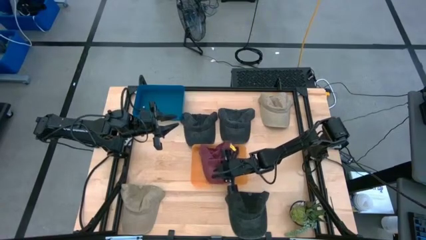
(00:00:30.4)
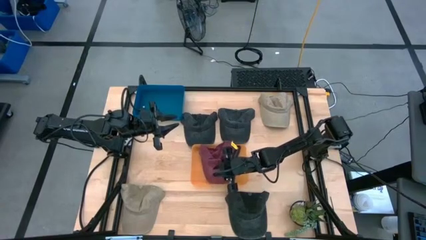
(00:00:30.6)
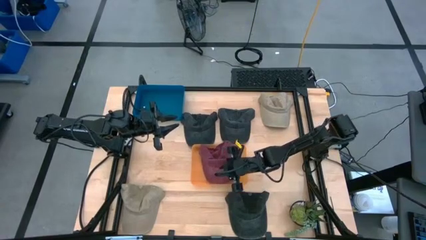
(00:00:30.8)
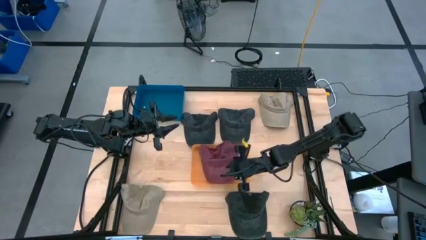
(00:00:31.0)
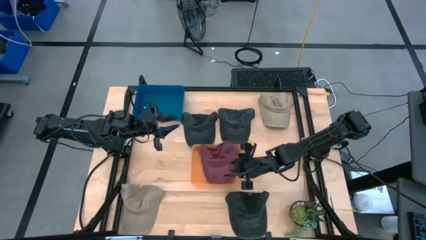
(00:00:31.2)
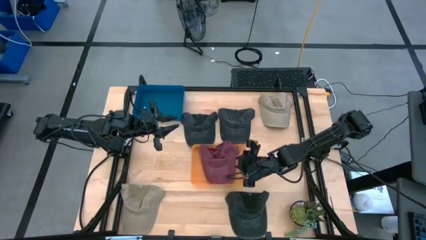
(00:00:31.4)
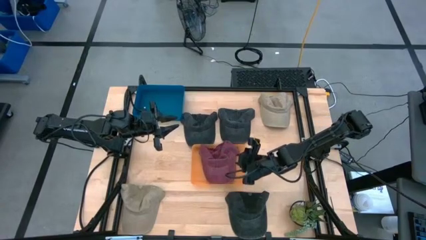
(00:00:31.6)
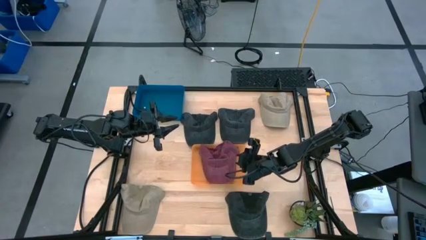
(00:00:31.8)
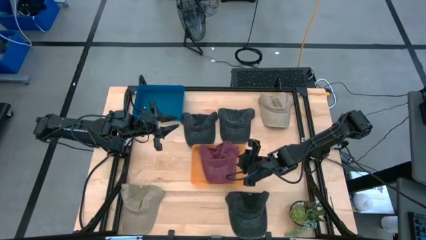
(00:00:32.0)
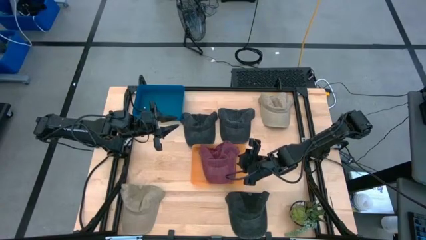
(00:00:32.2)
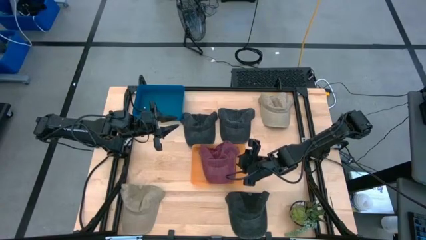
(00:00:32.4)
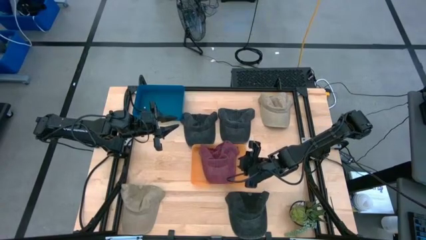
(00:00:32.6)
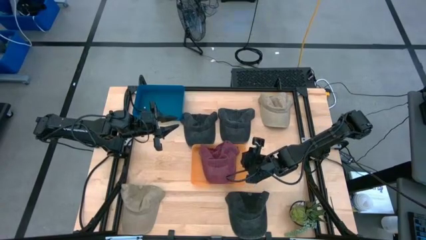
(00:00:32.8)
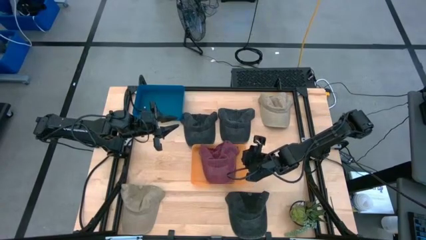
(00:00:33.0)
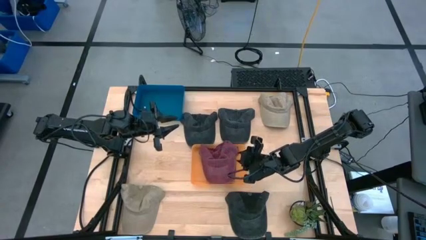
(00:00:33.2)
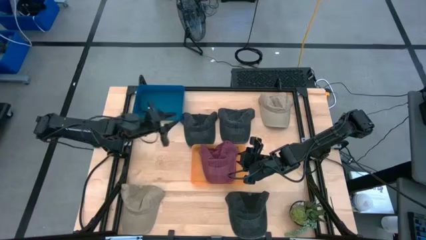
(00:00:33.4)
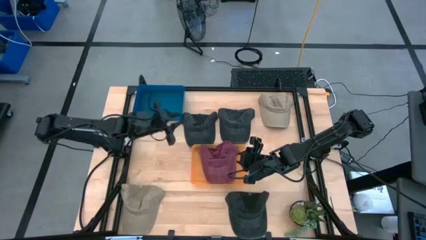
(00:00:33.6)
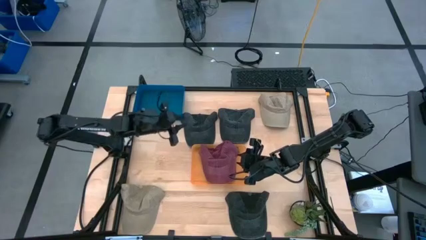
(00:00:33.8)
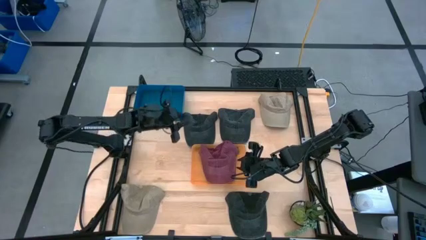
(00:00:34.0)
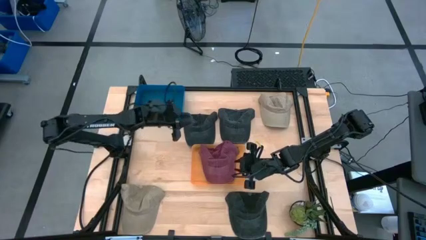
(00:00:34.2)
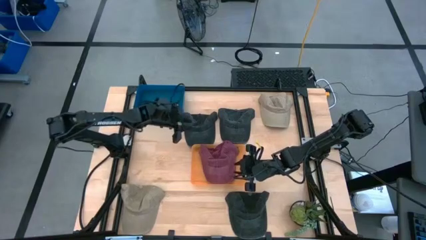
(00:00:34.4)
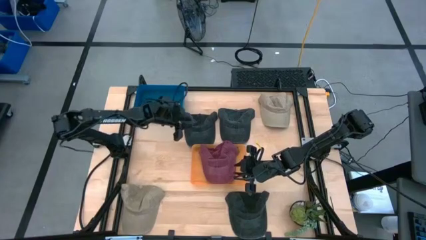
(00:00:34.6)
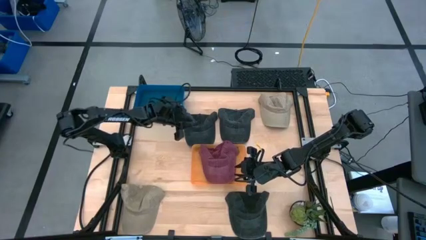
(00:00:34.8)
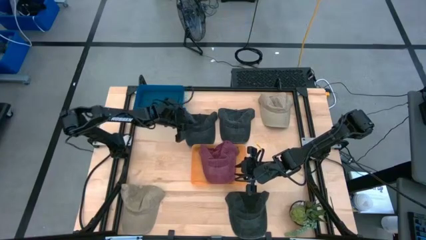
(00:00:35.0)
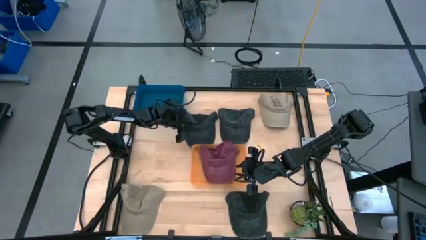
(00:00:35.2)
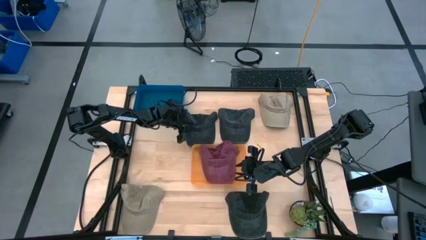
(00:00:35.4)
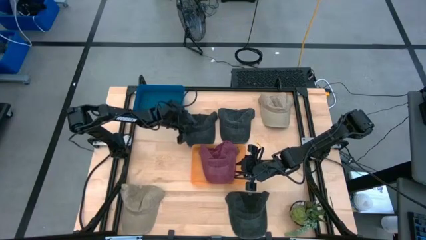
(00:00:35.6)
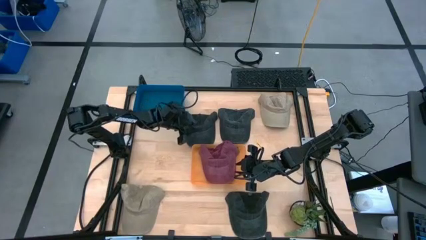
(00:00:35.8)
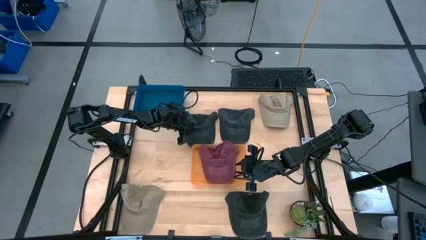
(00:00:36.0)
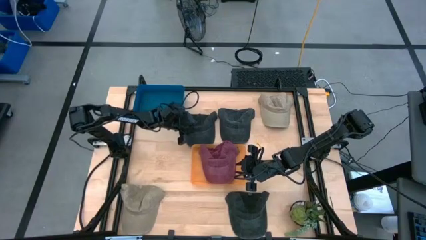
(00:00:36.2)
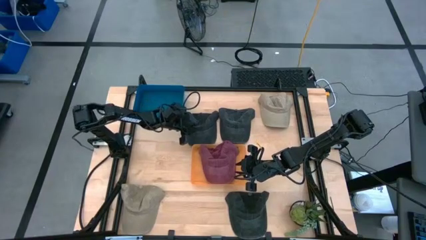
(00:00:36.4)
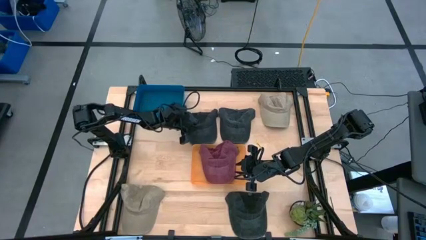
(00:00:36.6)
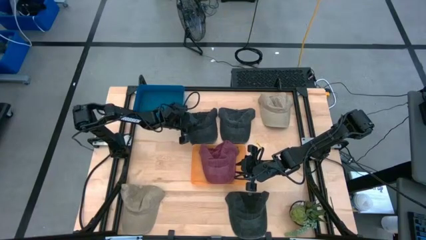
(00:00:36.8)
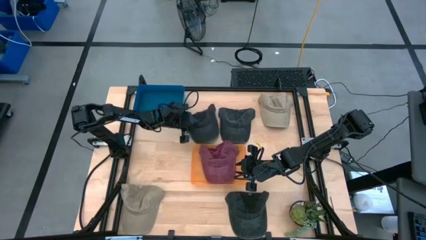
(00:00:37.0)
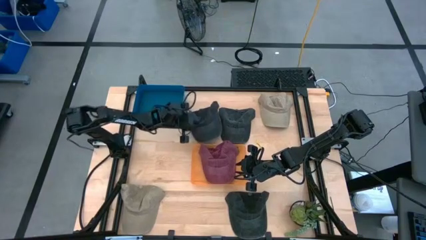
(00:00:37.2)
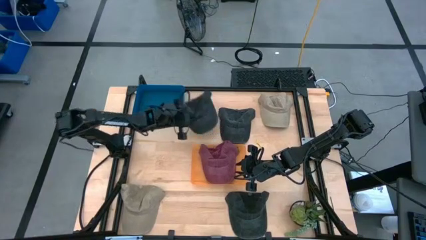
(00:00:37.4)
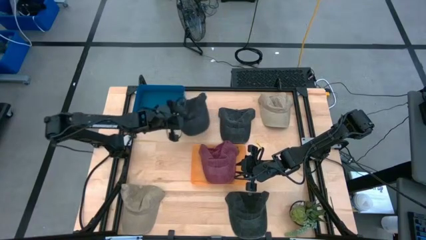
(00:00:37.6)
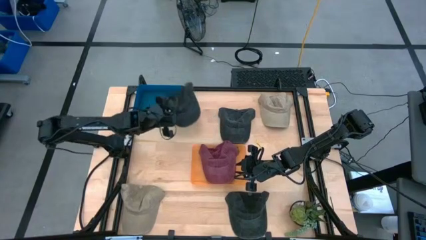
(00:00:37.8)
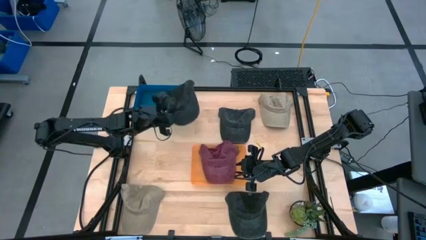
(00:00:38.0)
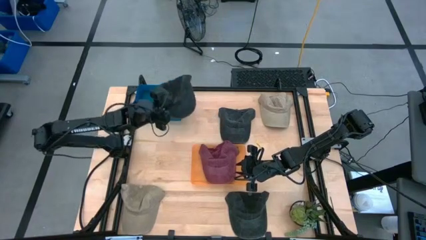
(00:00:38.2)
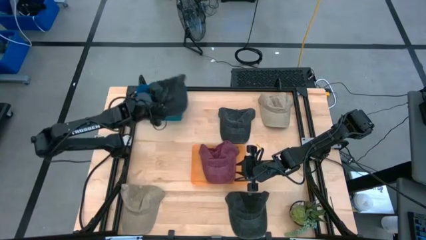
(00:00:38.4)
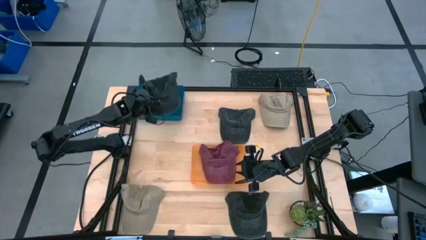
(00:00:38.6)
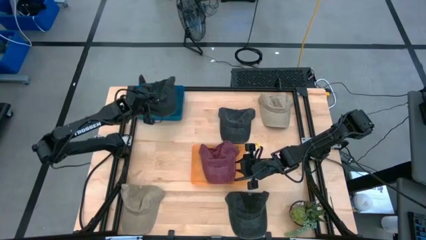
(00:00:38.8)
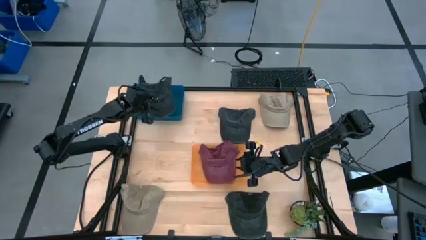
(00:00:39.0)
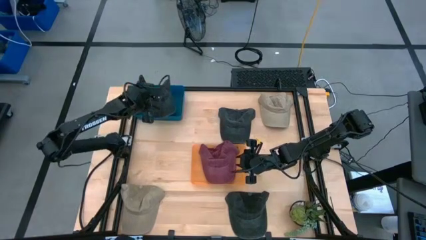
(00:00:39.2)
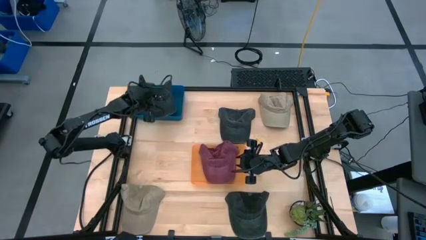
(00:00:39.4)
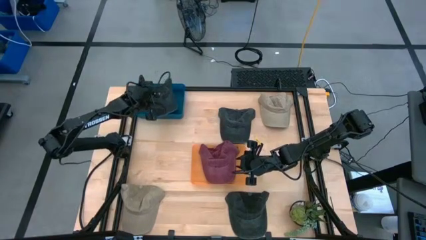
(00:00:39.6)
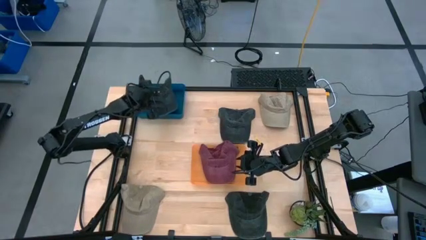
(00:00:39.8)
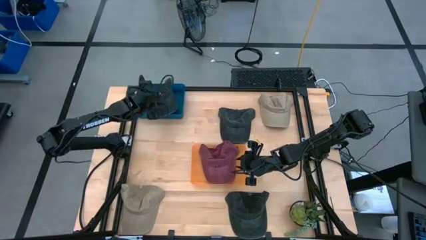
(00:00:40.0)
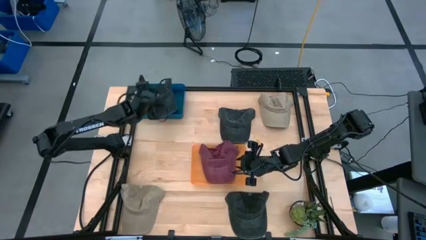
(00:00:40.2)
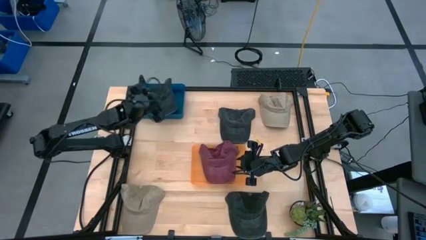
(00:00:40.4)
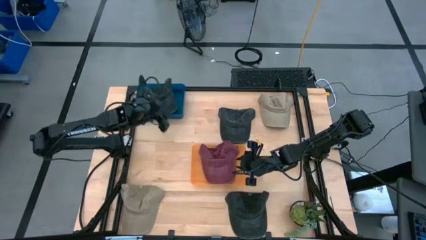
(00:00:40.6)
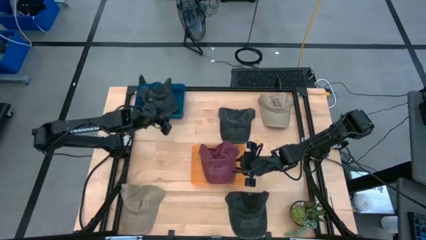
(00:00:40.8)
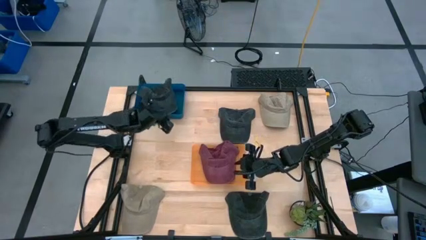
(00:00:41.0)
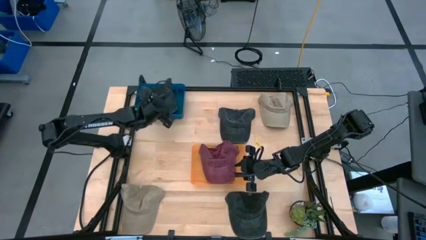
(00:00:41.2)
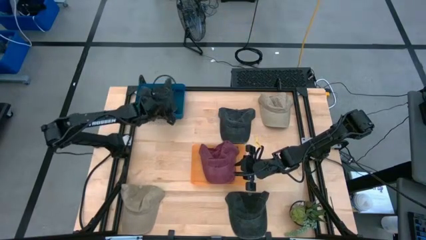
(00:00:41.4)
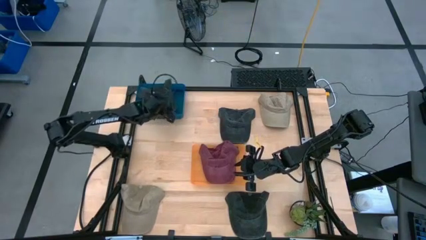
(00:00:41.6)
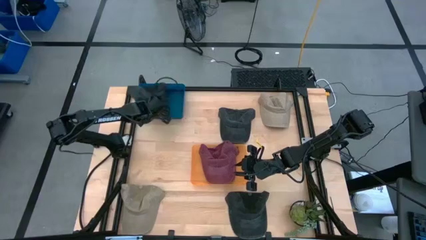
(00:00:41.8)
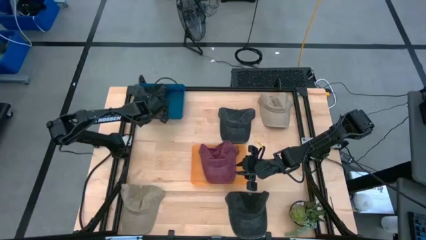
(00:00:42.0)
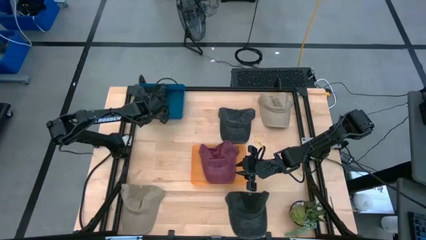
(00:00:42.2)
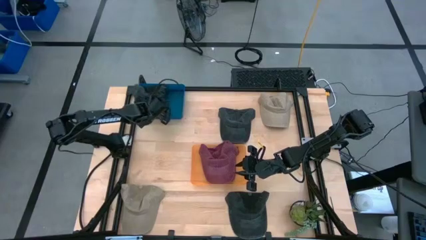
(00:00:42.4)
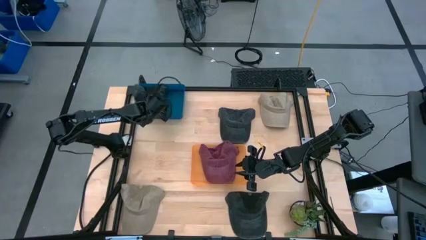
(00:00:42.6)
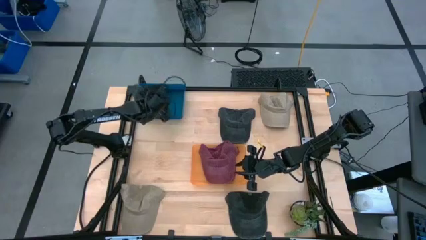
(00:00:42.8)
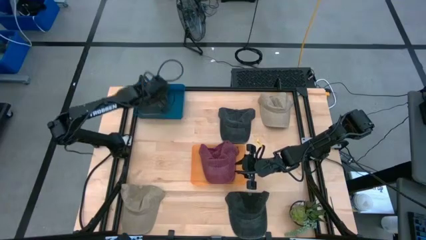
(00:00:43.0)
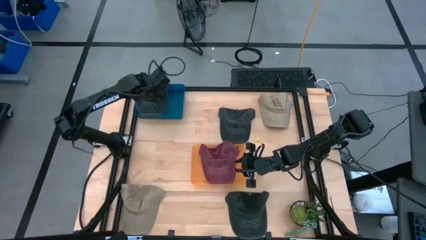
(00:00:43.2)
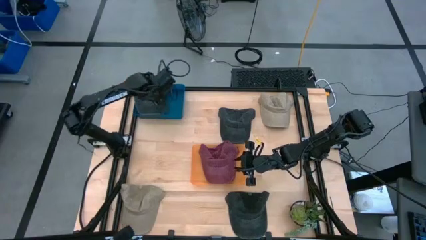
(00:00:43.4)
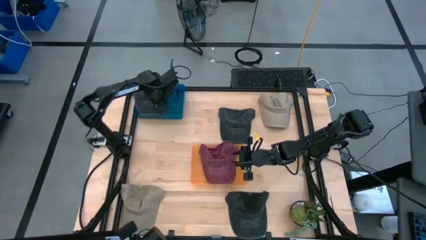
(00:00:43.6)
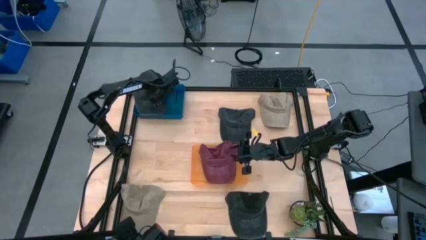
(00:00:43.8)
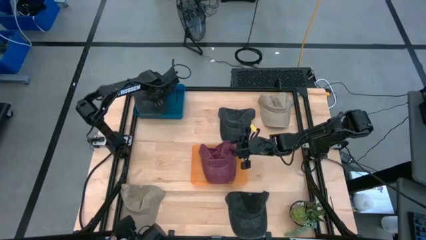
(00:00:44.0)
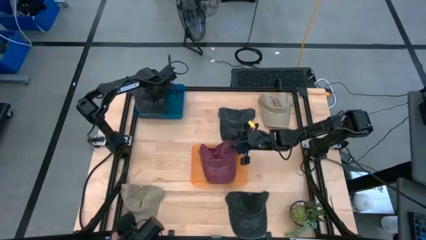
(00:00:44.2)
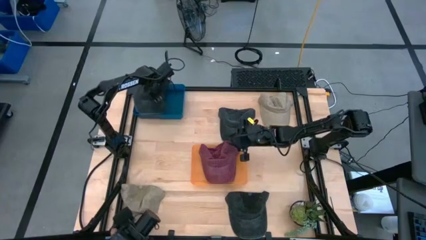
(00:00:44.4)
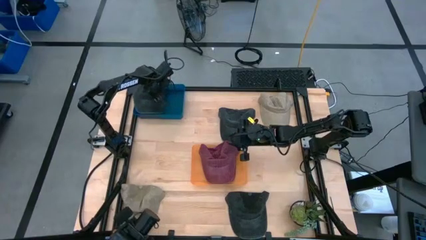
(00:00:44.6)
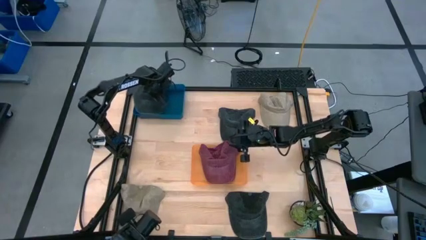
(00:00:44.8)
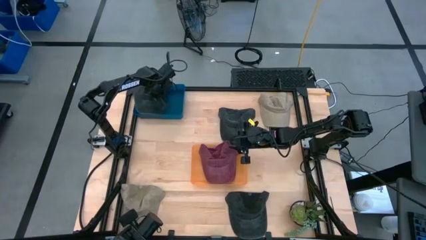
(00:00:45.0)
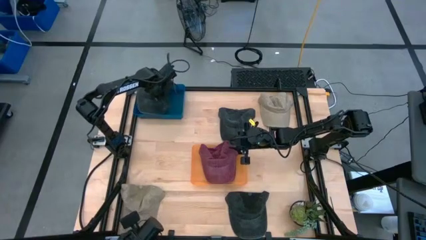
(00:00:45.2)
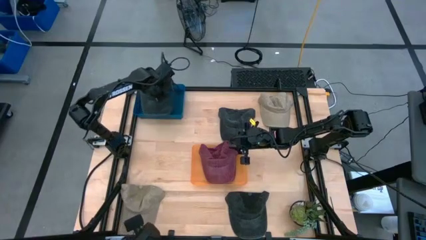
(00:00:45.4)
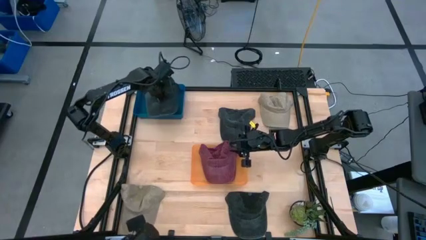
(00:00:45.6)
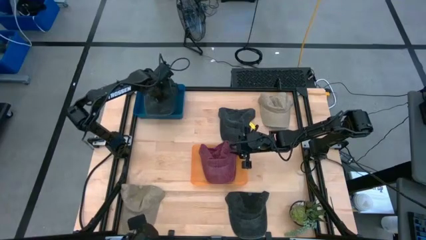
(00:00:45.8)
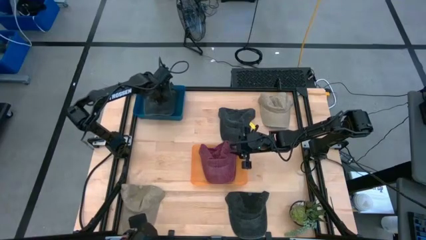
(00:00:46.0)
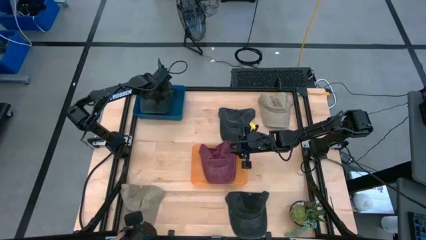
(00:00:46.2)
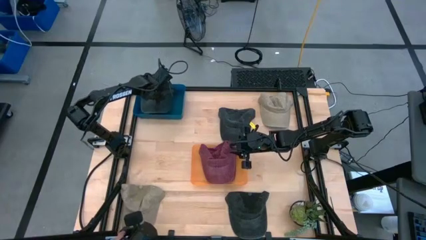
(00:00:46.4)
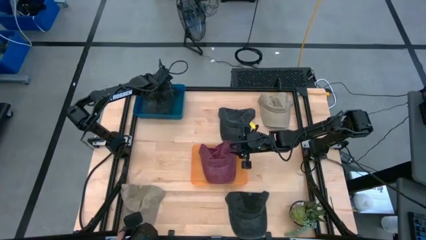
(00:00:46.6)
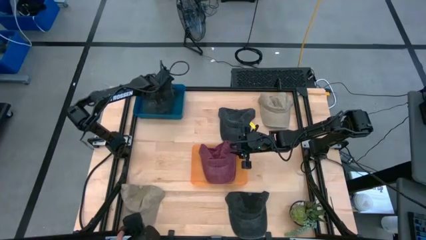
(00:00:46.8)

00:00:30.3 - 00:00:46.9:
Task: Pick & Place hat
Put the top left black cap into the blue bin
